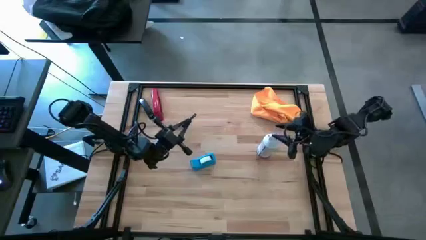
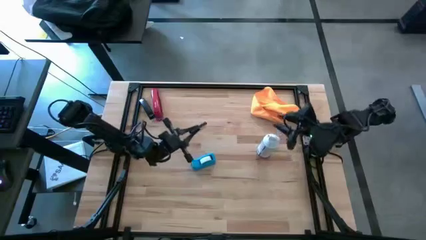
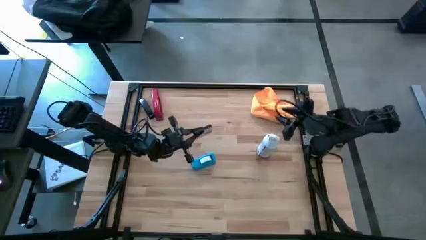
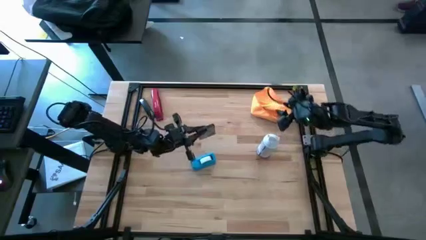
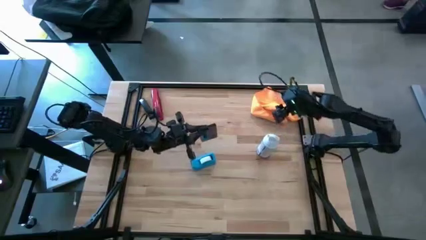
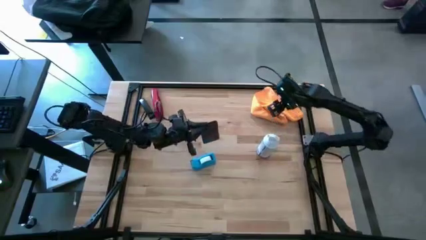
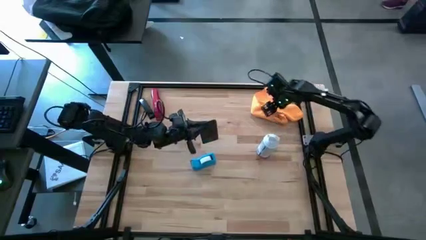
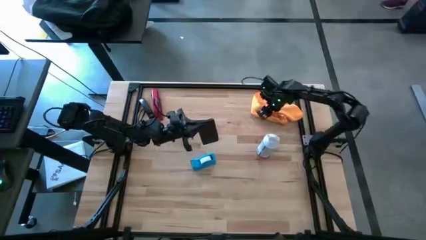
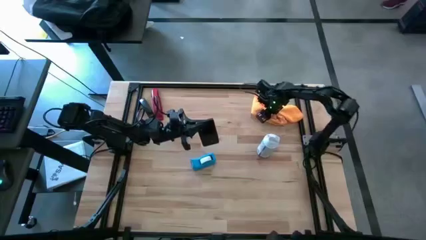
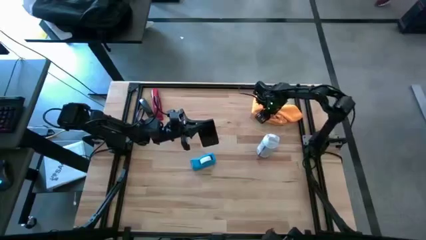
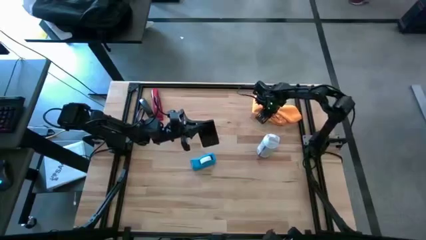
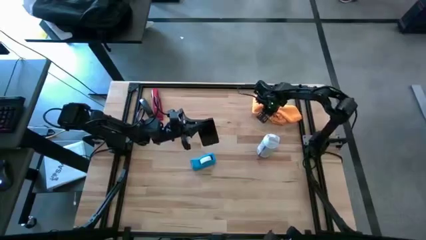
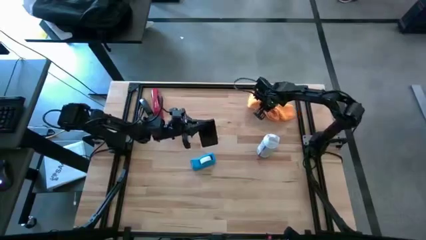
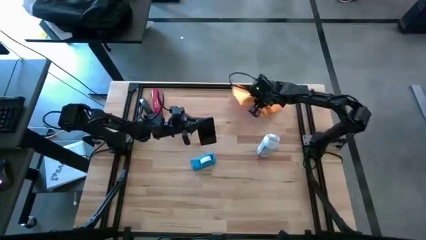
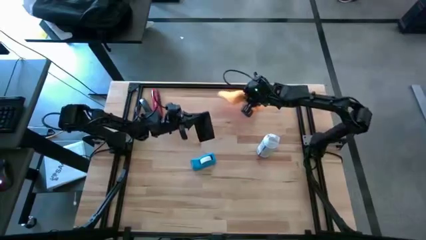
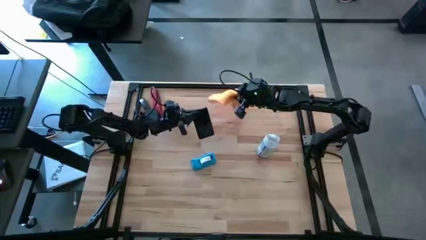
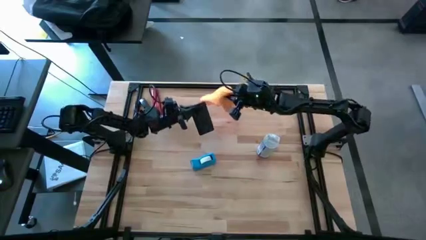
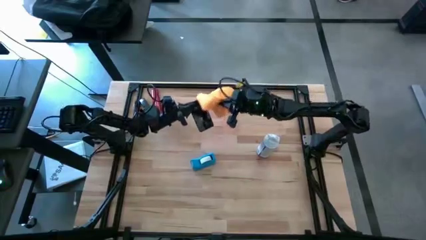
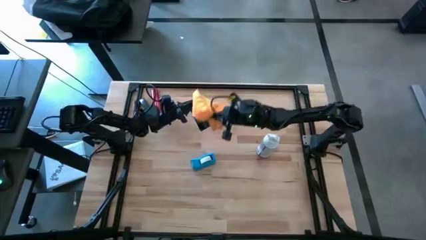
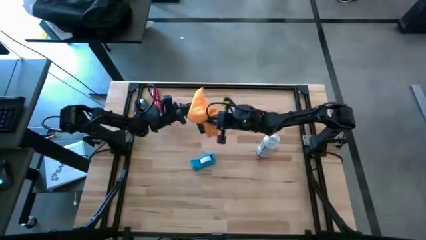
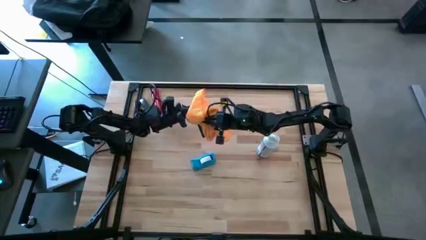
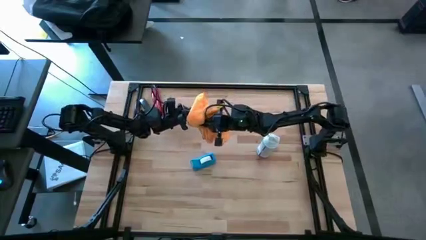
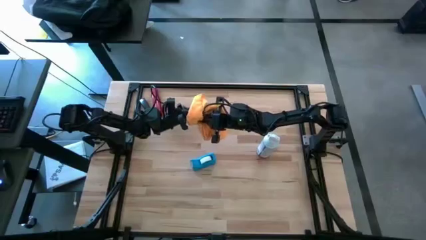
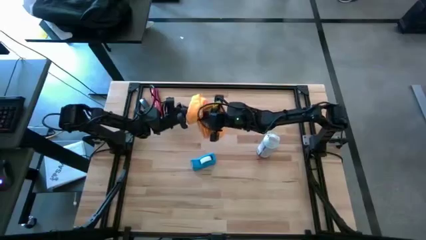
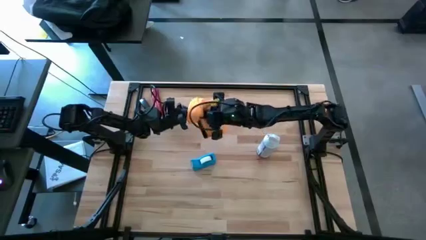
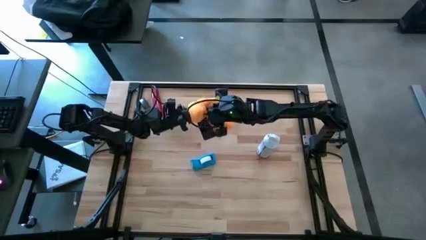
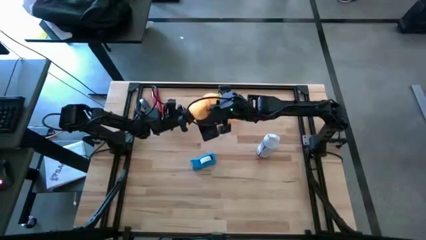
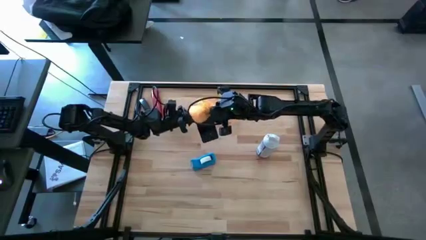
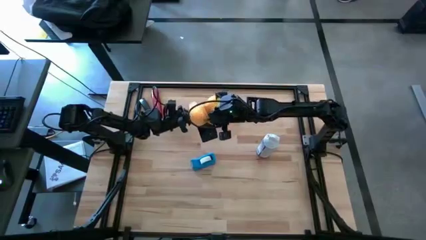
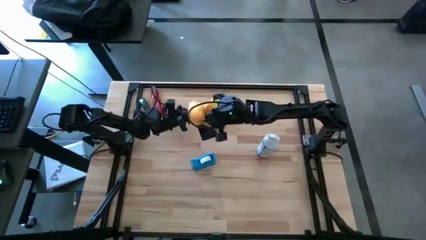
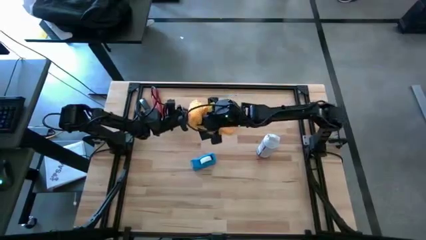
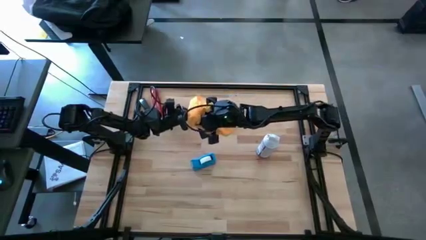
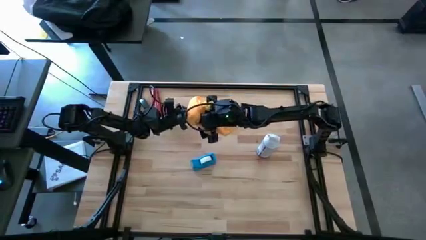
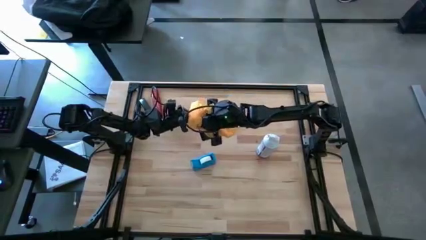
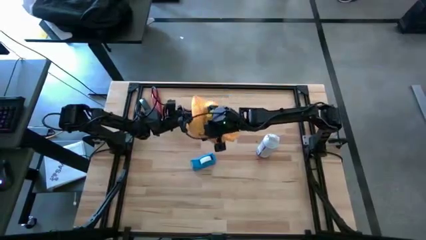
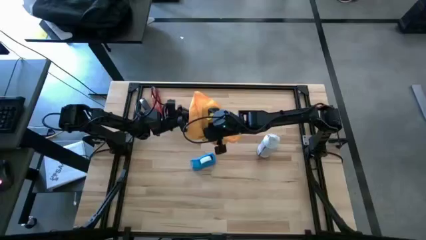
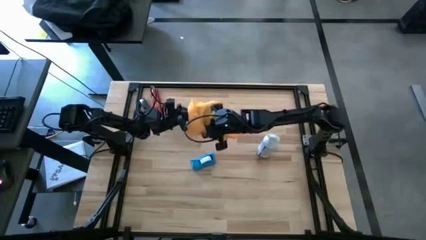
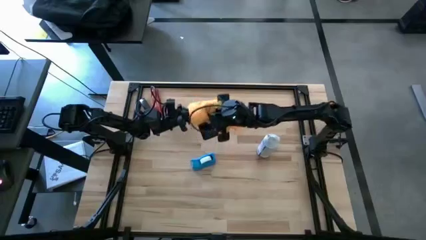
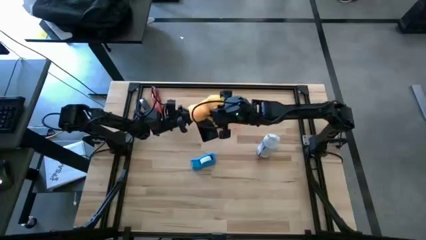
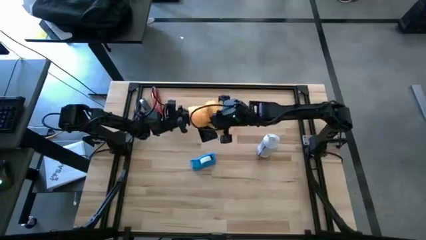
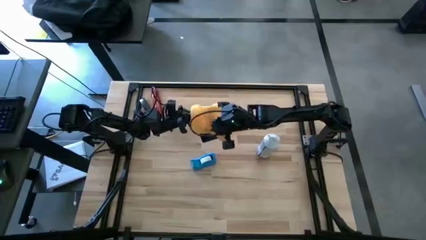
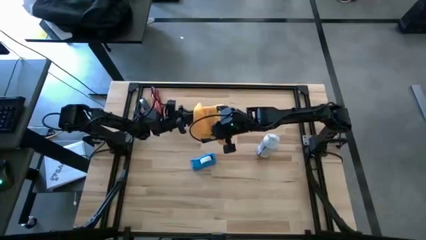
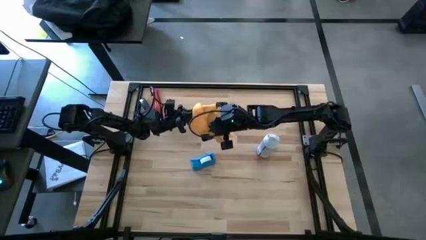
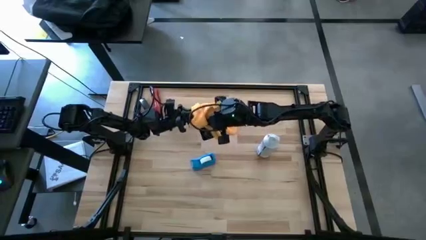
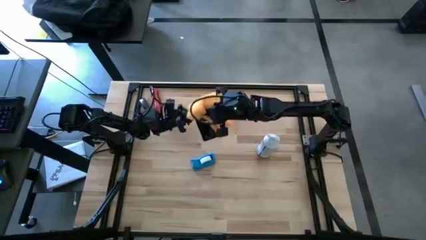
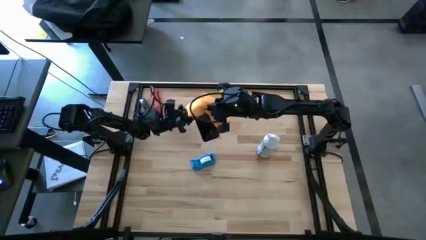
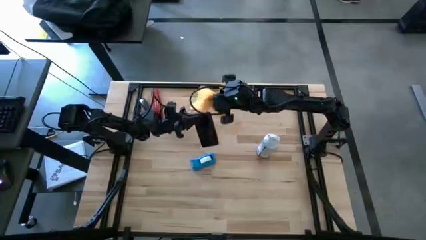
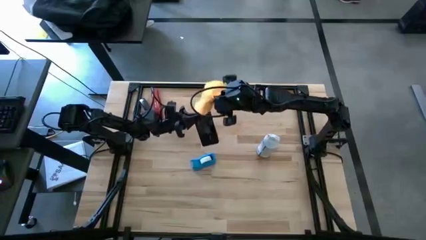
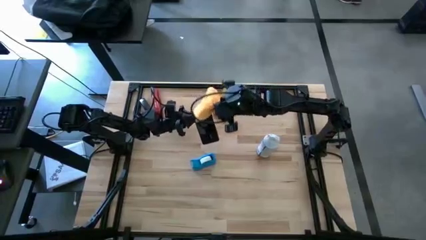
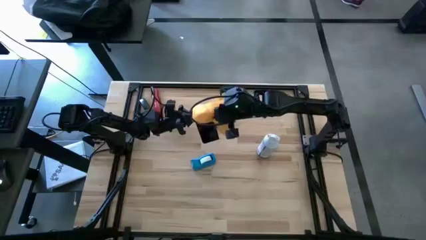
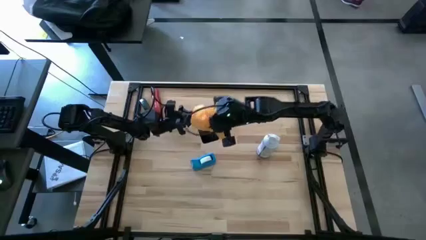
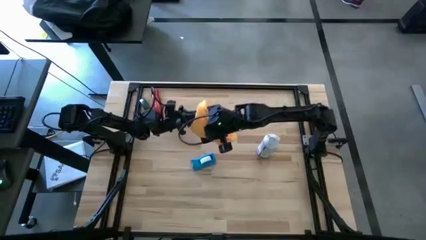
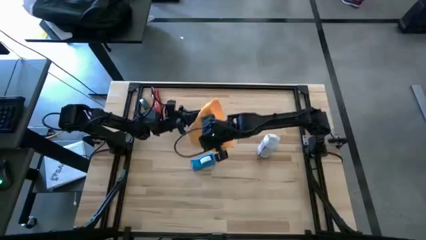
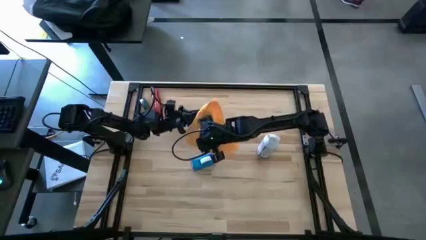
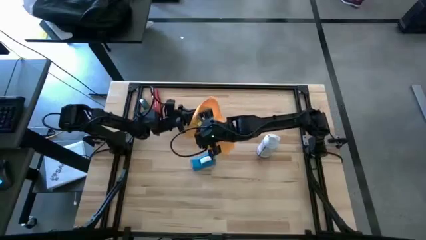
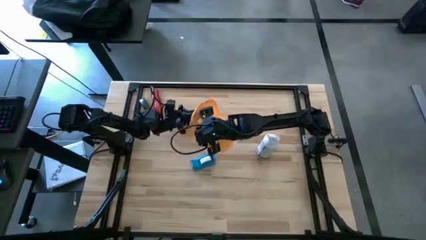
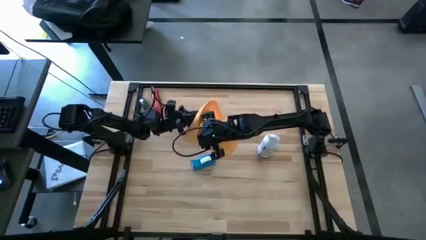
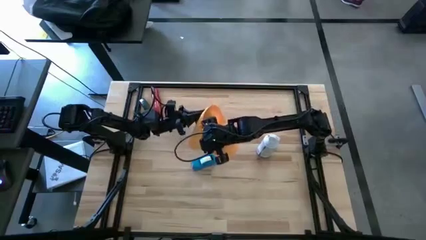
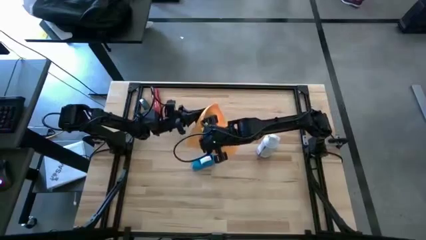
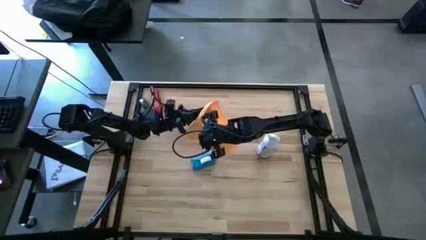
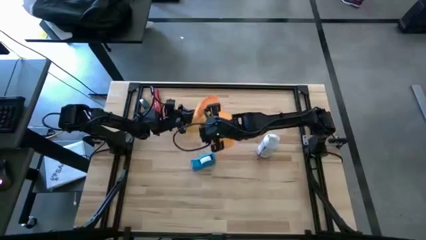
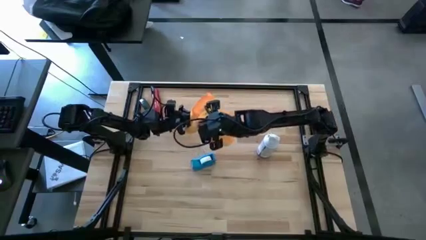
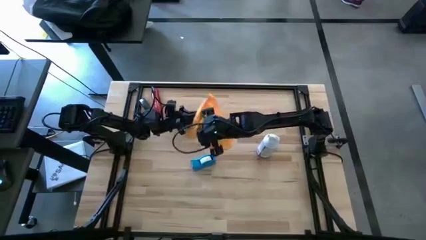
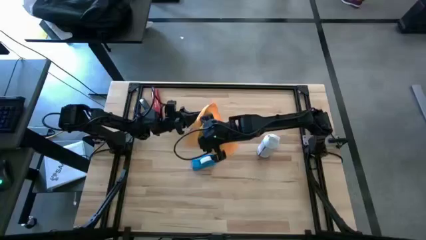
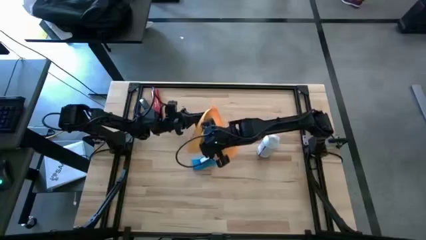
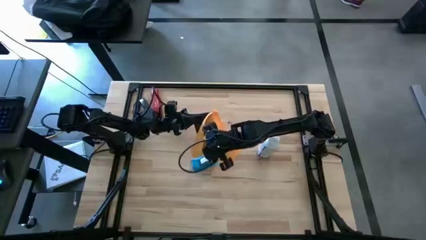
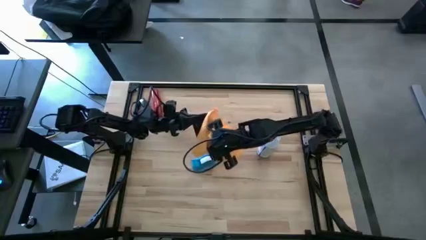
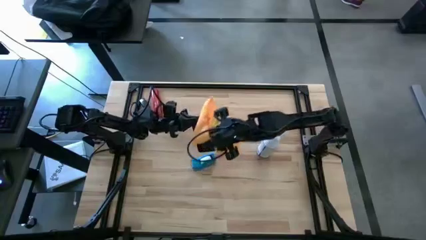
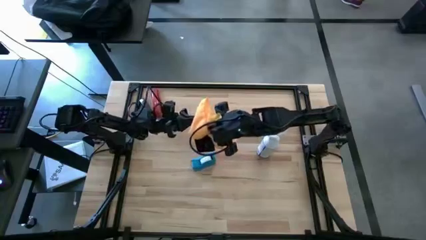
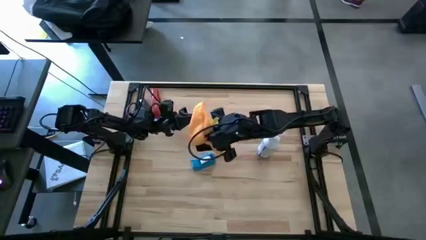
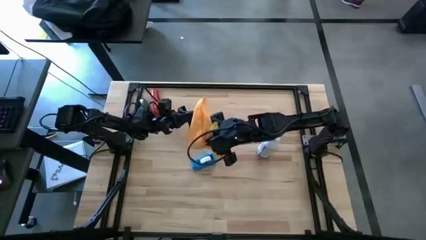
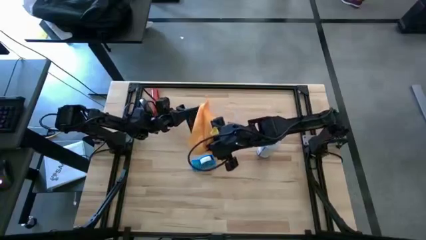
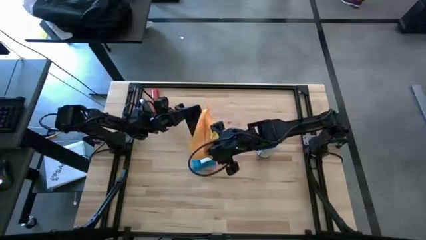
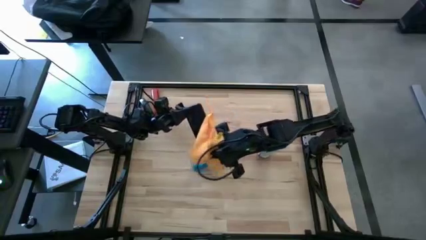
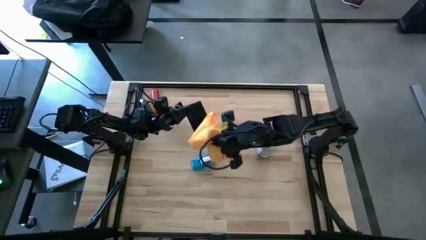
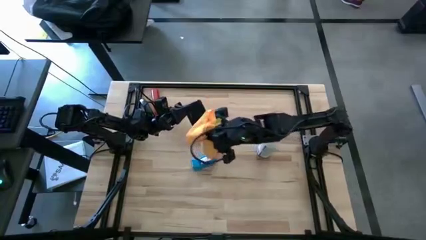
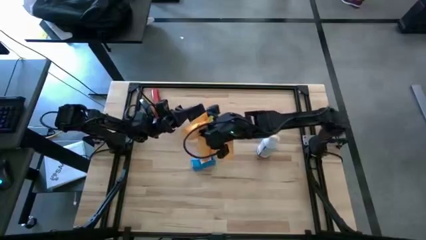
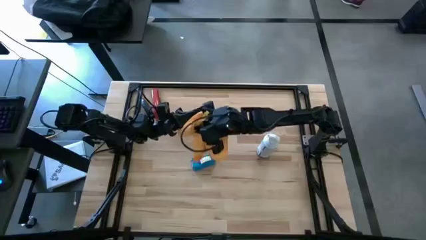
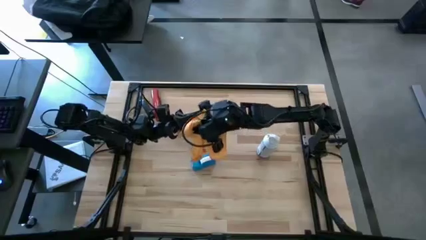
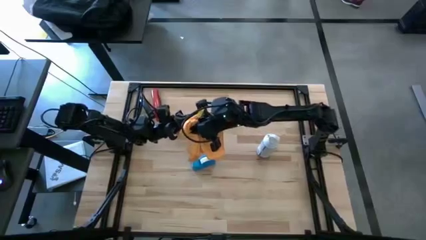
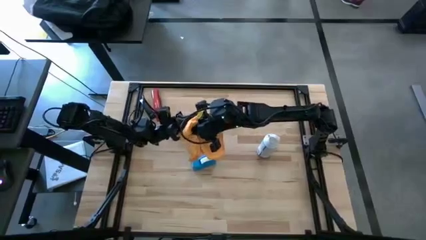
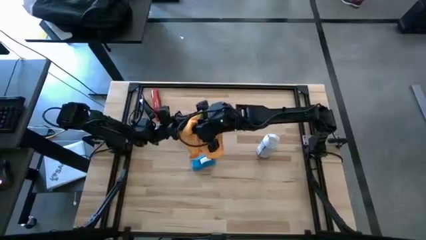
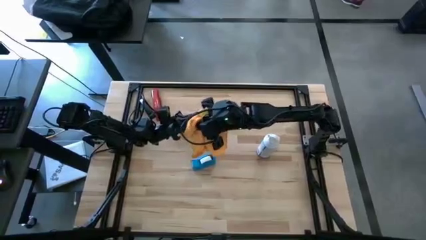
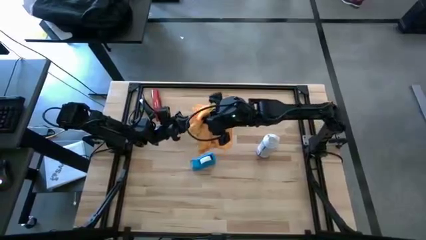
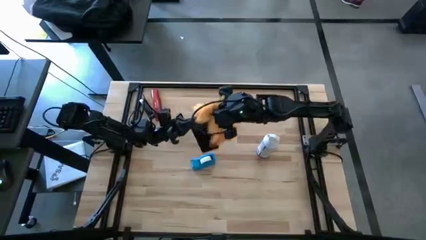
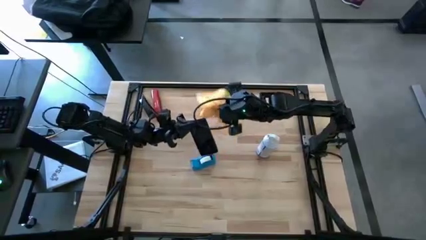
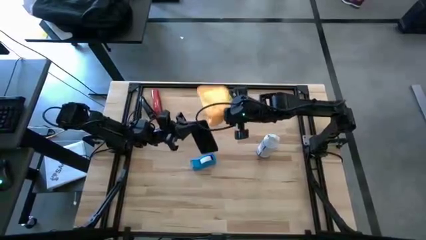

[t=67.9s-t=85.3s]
Task: Apply microfiber cloth
Wipe the back of the cellphone with an orange microfiber cloth
